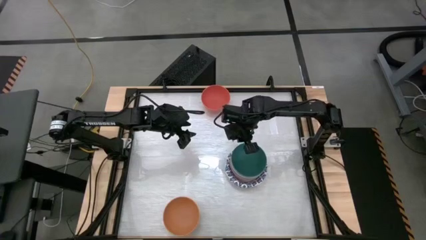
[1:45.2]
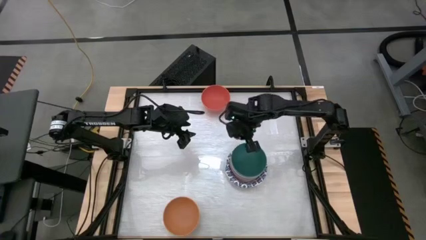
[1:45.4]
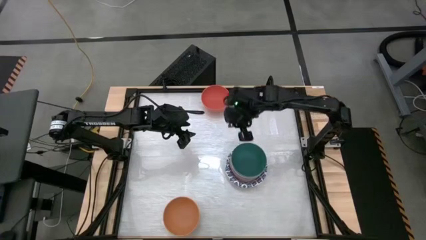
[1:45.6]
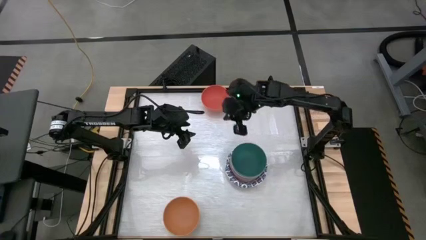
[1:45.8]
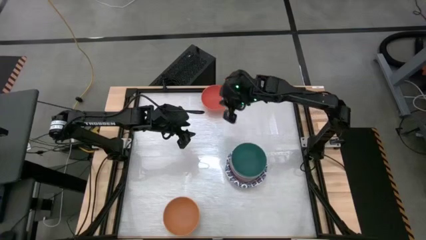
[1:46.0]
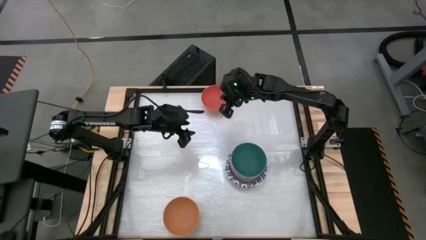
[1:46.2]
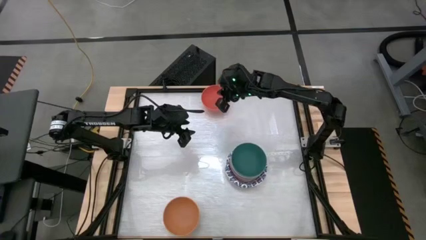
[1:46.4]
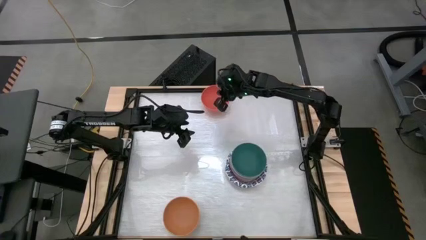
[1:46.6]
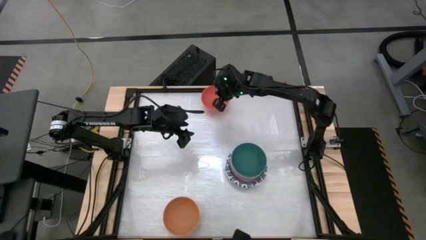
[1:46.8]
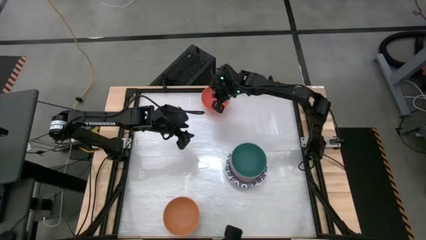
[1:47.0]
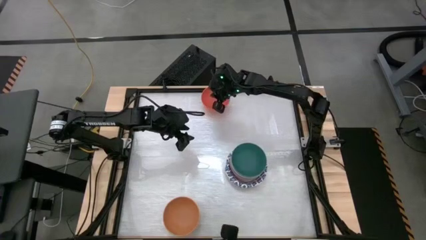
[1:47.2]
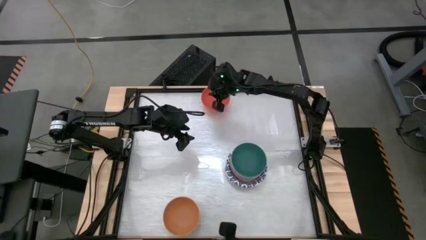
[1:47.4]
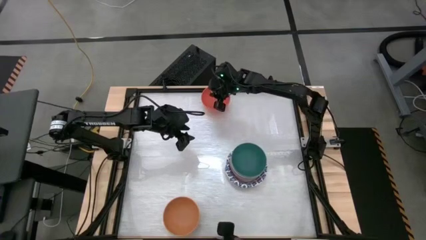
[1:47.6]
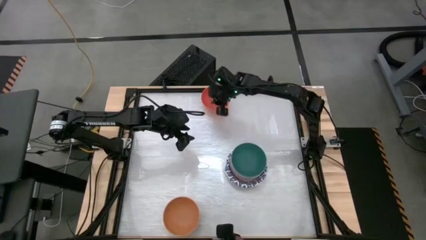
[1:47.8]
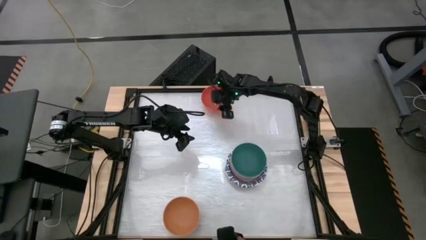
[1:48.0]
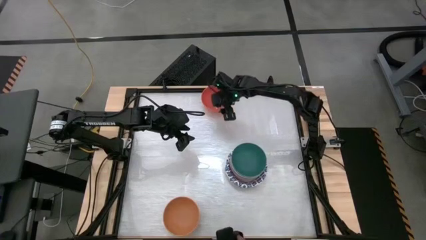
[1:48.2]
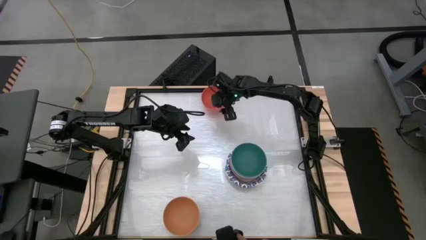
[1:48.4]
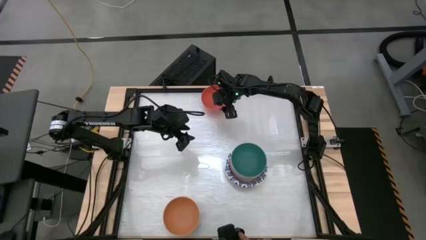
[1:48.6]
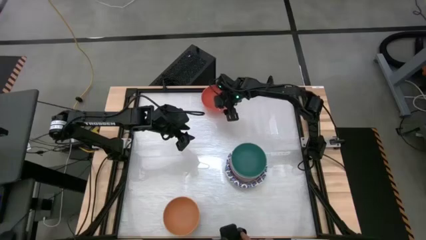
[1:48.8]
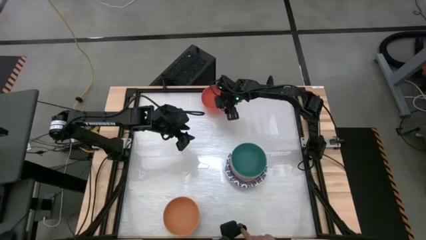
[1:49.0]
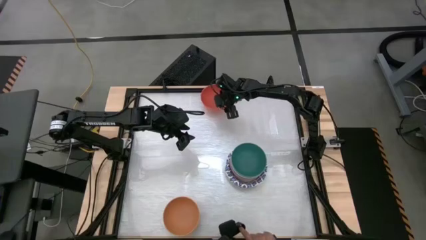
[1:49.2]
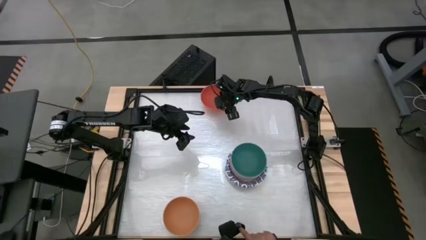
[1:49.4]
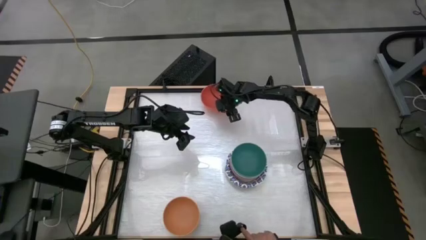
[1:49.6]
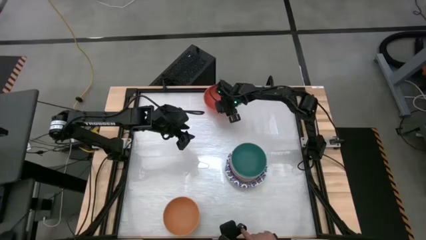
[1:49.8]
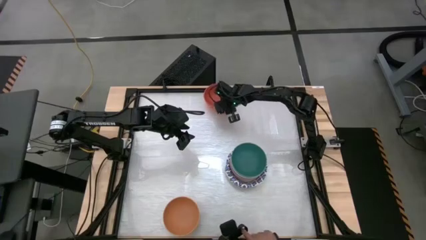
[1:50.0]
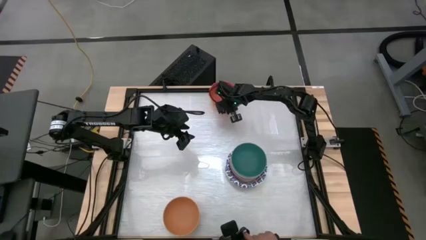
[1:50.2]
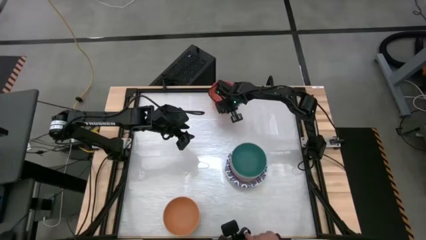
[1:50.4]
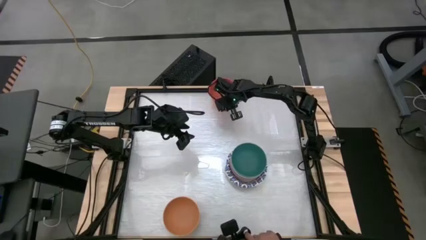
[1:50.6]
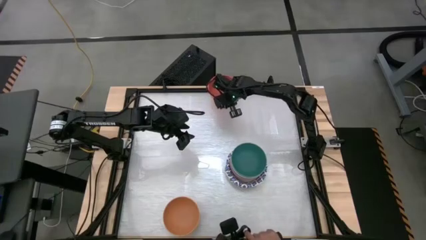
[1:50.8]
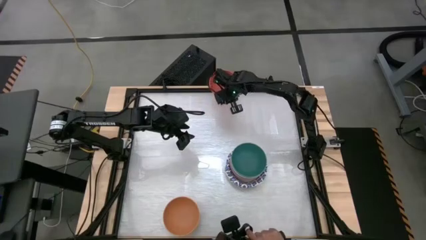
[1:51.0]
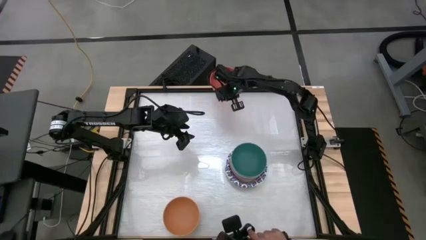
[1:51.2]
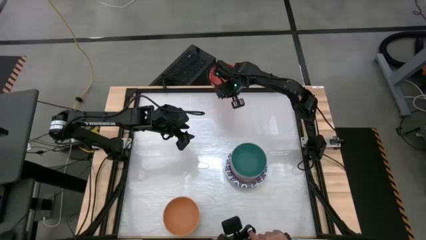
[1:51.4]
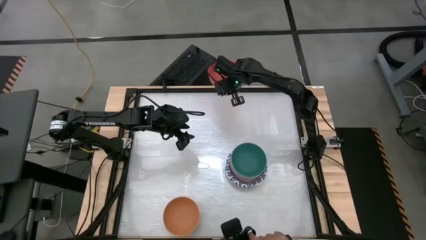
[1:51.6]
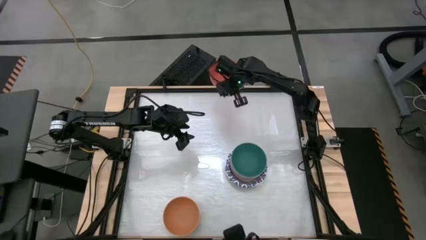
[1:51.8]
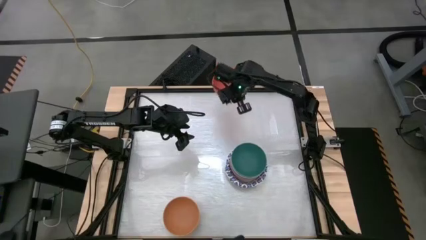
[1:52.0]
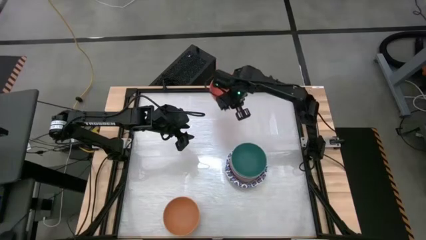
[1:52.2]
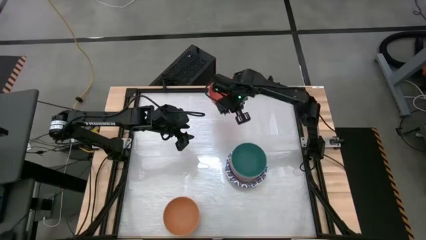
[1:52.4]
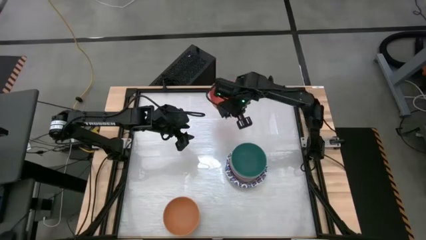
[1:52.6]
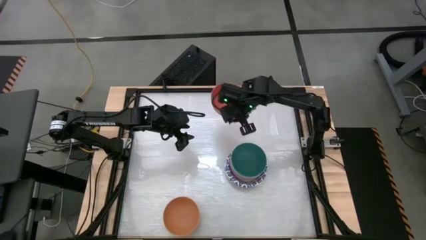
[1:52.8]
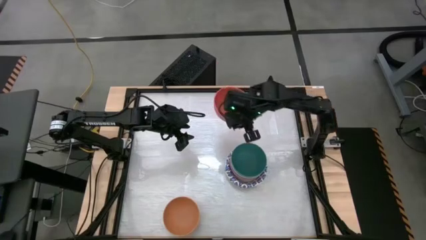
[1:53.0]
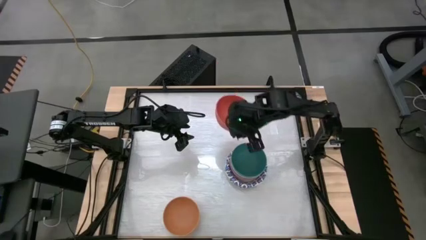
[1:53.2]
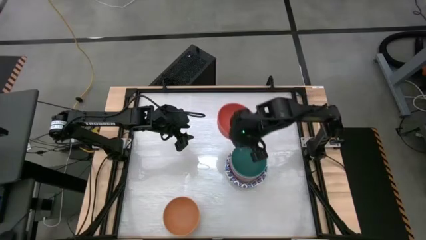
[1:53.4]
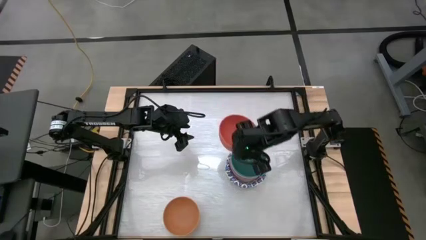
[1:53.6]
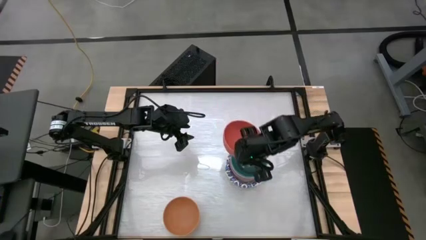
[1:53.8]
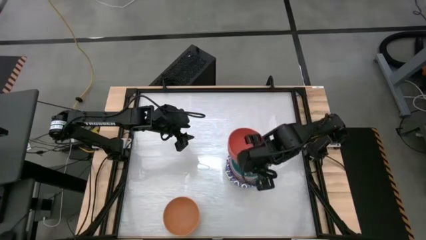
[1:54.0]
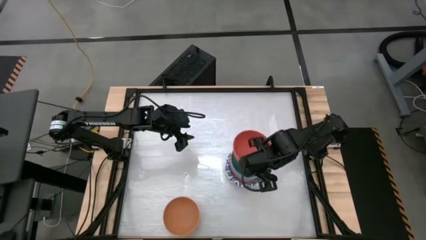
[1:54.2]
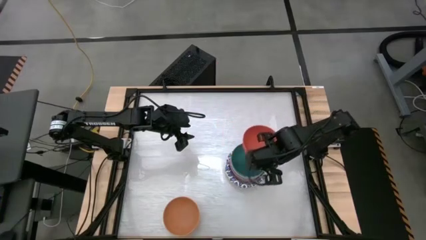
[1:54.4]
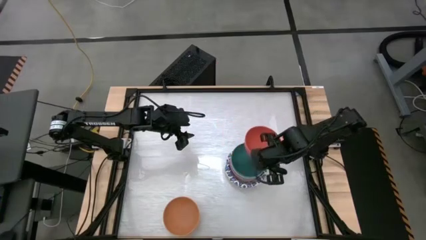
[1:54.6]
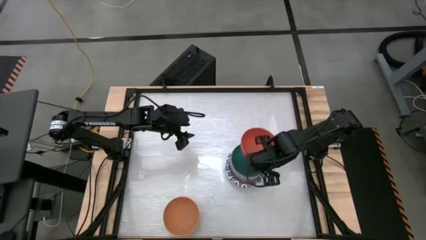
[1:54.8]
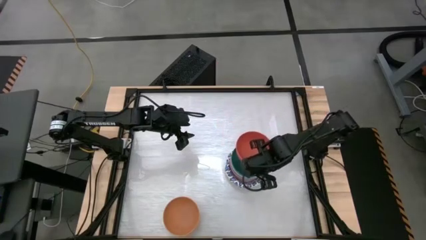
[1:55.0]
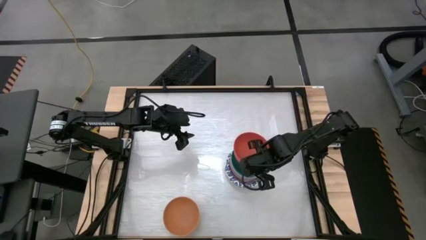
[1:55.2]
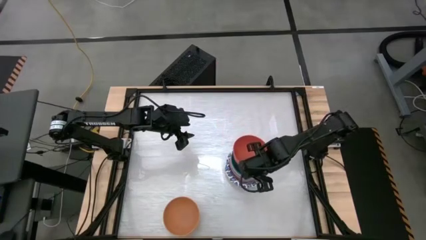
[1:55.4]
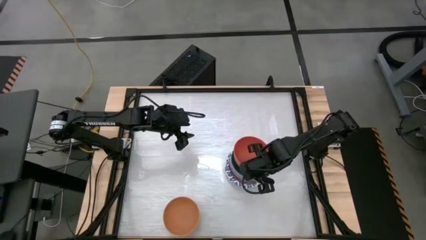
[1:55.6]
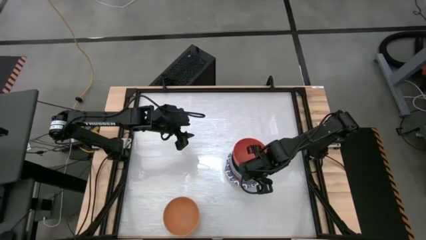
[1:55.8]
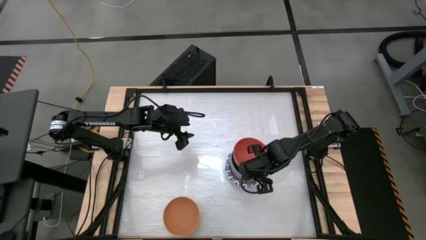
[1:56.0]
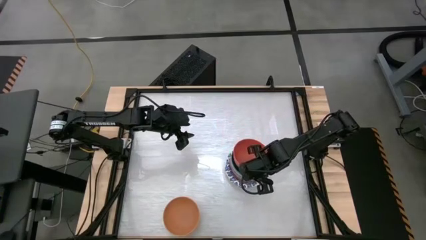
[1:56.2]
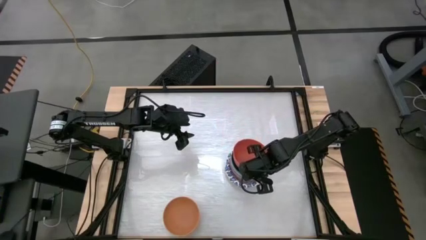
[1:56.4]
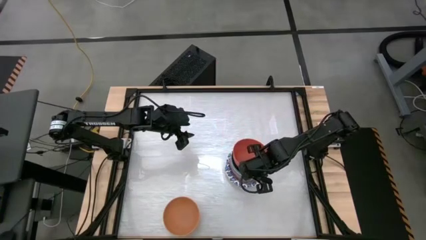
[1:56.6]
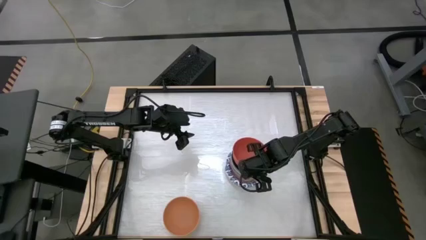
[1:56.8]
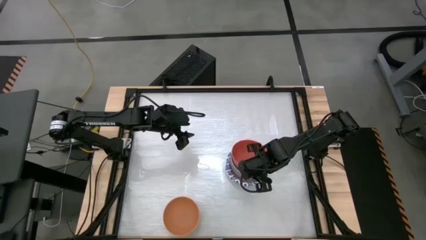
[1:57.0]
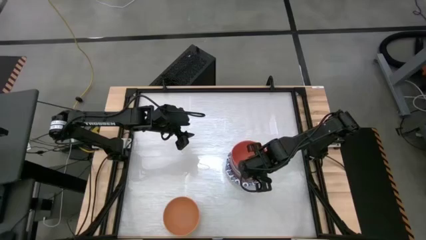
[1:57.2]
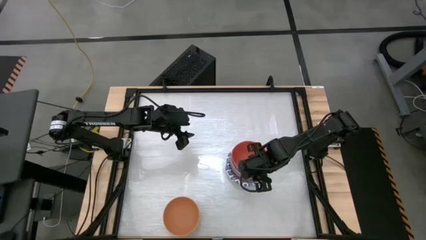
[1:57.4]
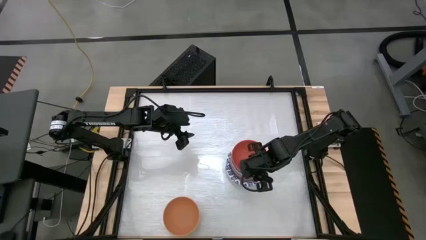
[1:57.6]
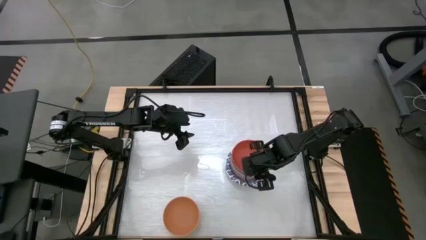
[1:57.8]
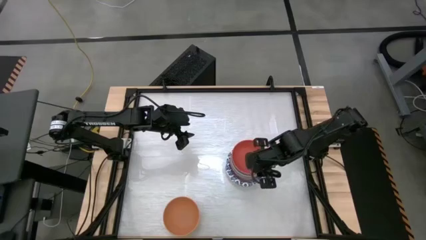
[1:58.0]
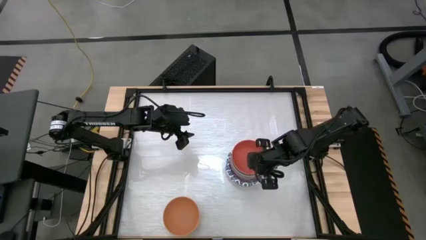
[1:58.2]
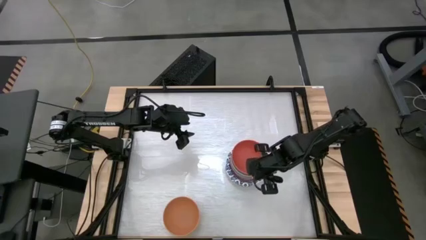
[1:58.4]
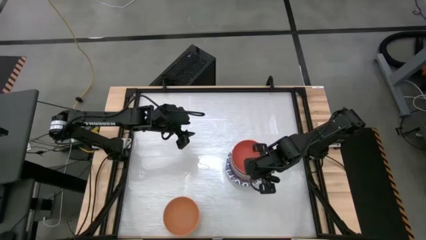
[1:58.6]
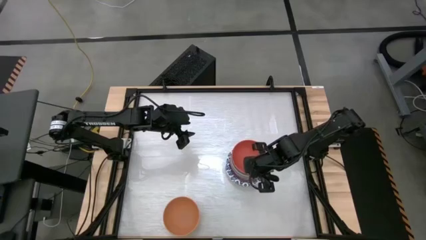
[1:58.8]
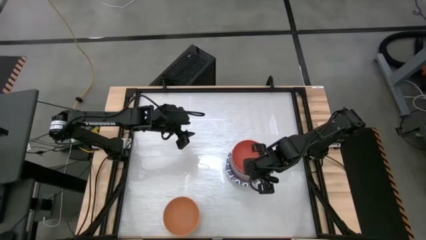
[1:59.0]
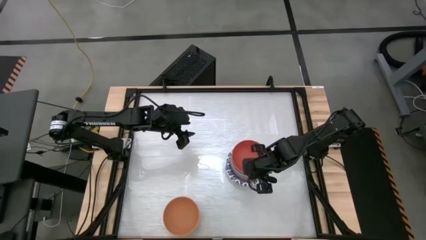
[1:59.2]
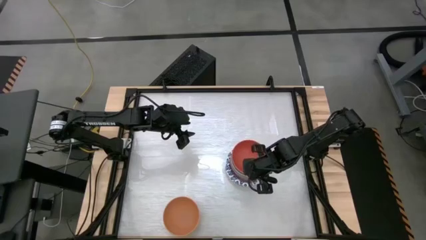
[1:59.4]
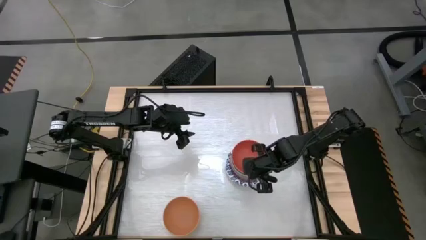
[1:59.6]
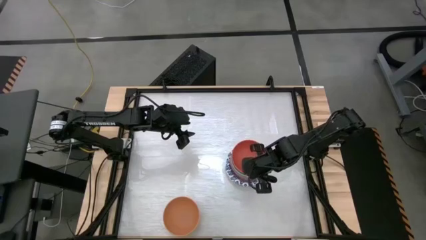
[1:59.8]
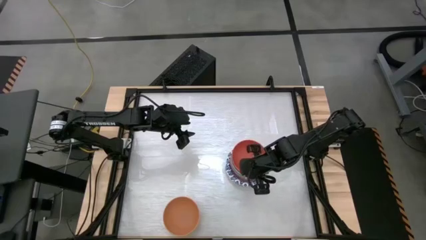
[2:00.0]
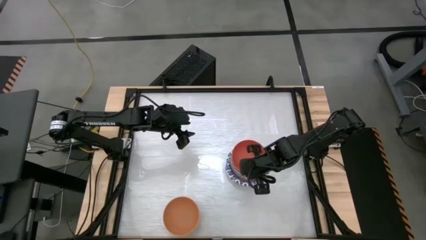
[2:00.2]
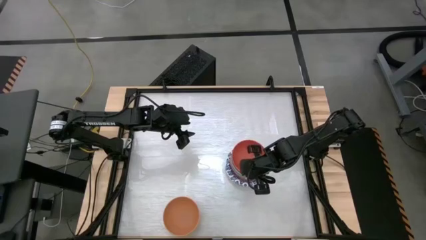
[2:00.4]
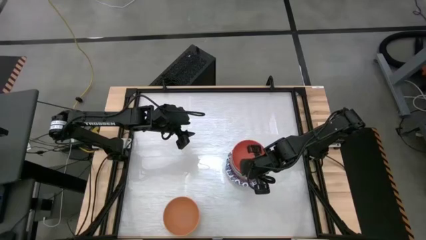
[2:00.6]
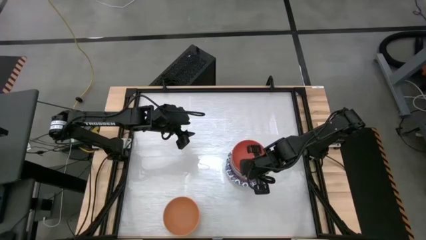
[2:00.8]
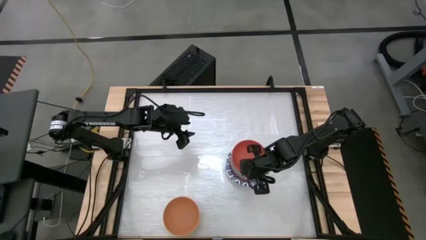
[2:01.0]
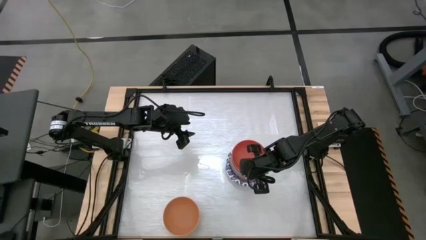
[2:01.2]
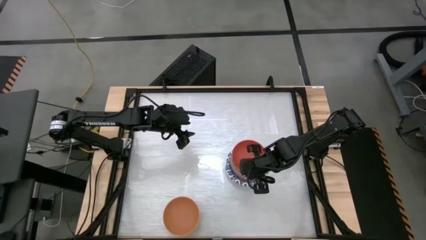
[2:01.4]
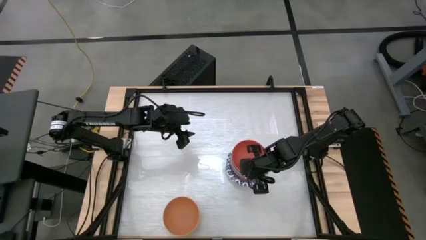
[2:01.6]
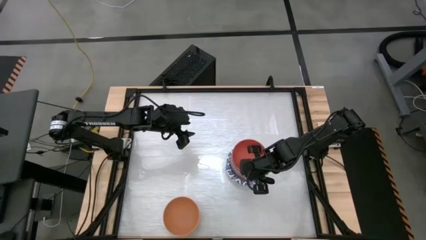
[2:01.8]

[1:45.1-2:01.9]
Task: Nest bowls inside each other by size order
Stack the orange bowl into the green bowl
